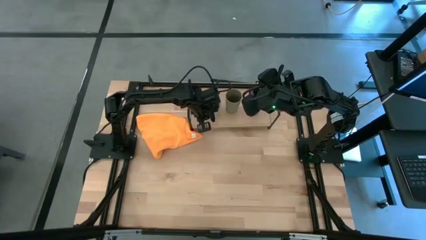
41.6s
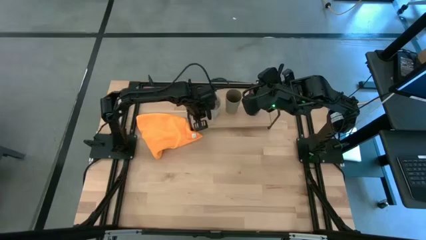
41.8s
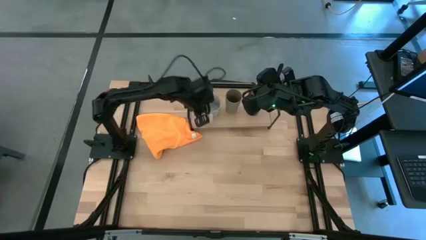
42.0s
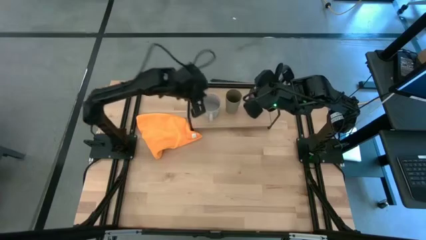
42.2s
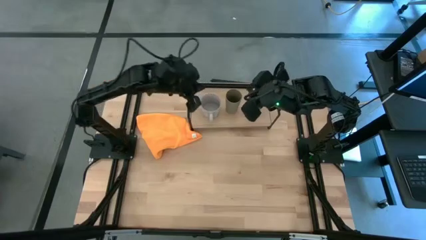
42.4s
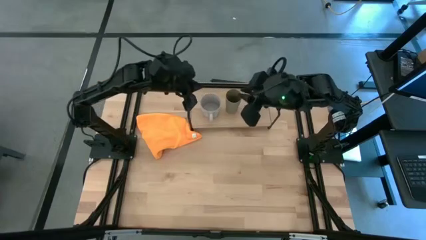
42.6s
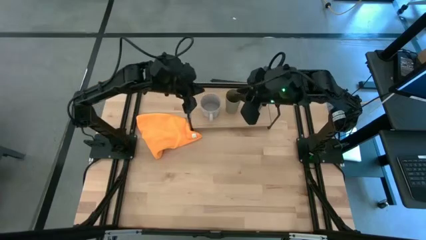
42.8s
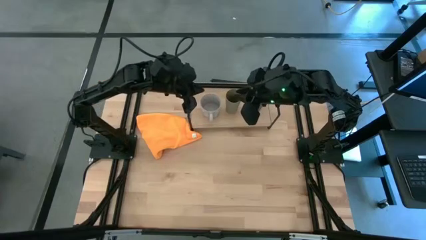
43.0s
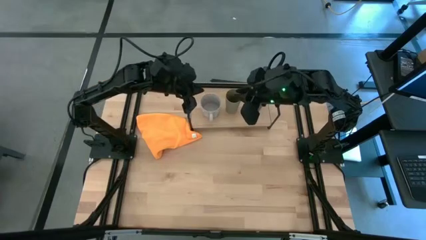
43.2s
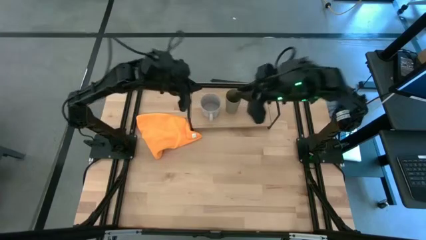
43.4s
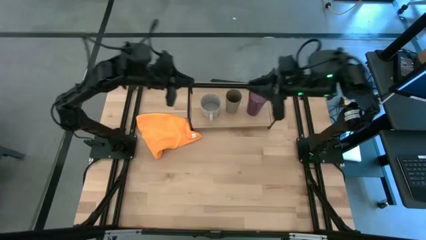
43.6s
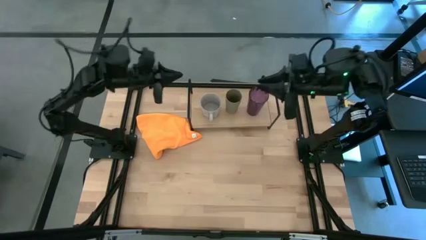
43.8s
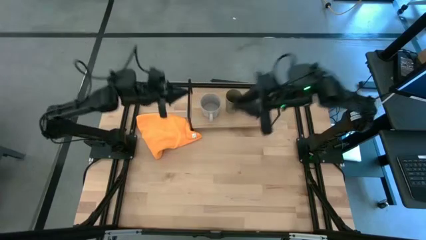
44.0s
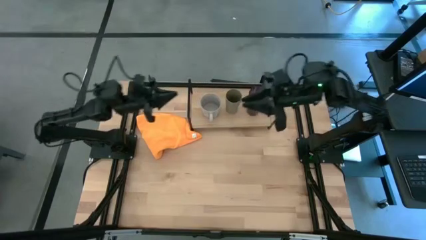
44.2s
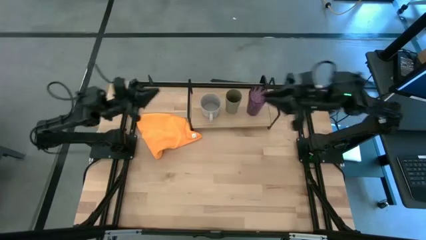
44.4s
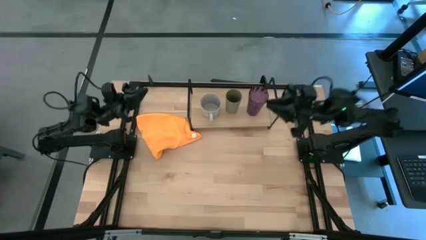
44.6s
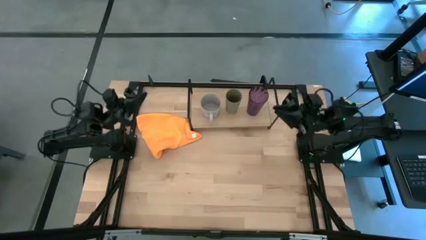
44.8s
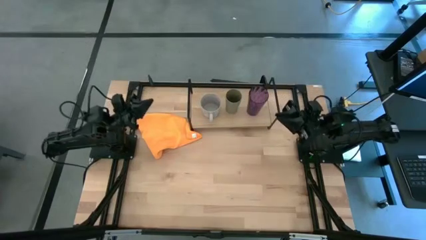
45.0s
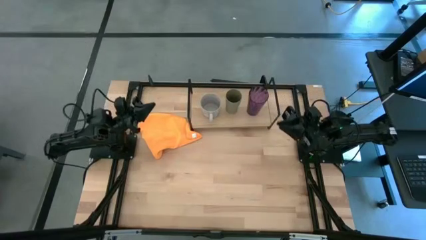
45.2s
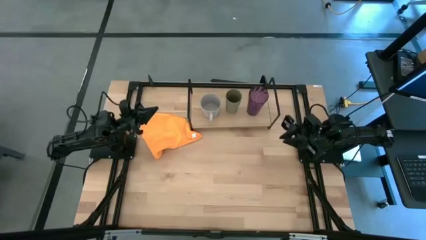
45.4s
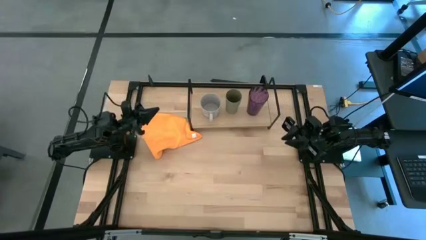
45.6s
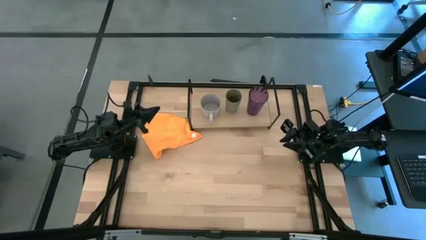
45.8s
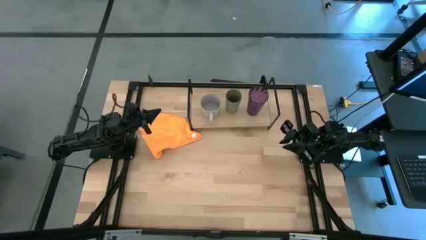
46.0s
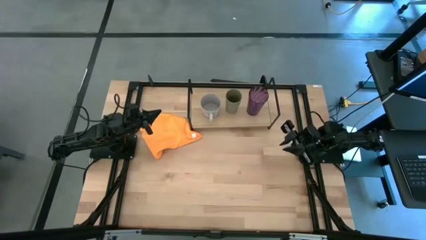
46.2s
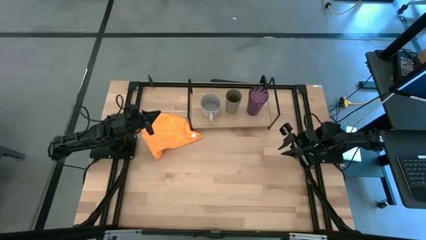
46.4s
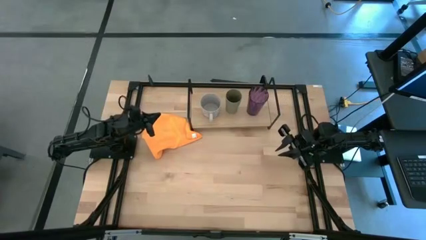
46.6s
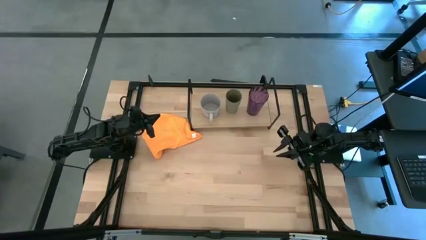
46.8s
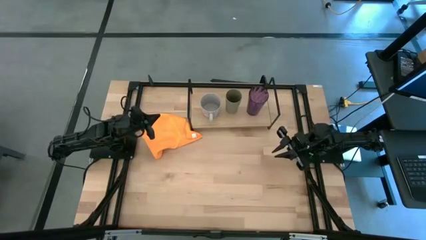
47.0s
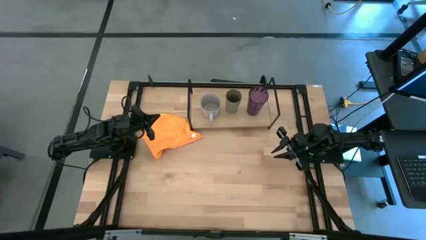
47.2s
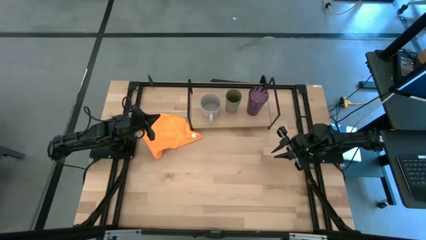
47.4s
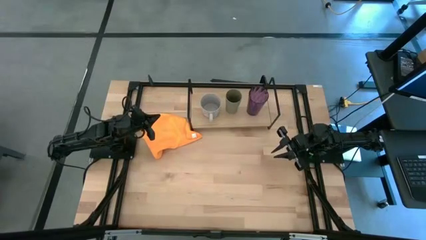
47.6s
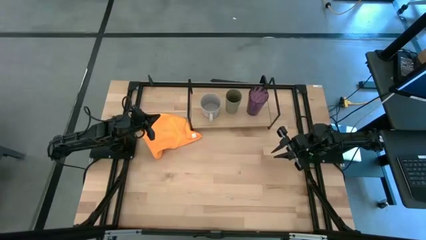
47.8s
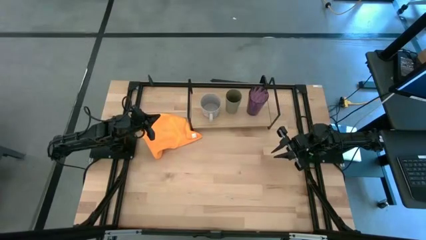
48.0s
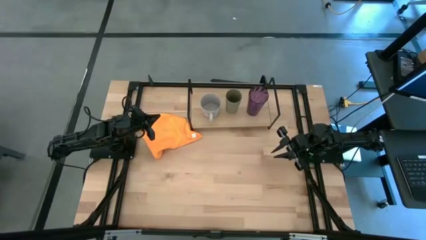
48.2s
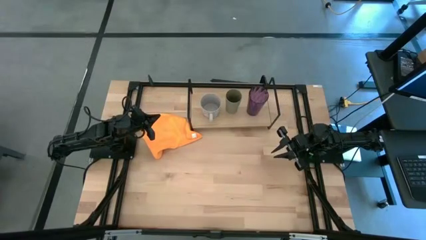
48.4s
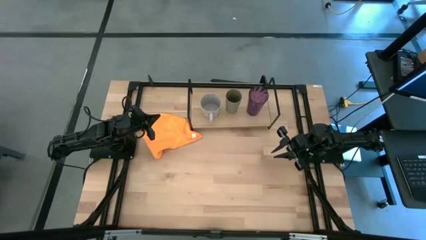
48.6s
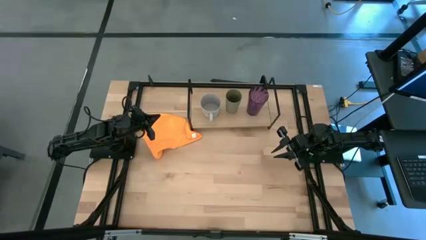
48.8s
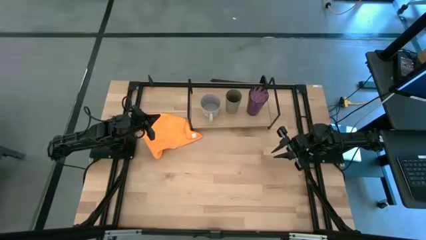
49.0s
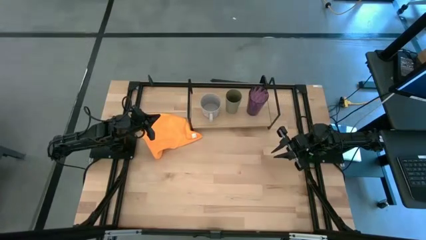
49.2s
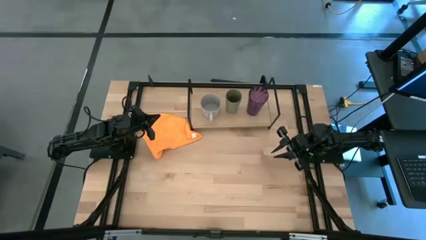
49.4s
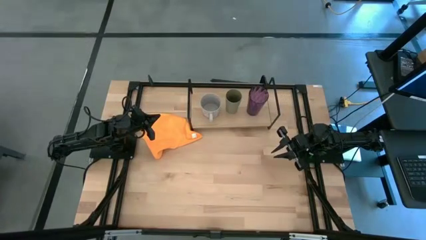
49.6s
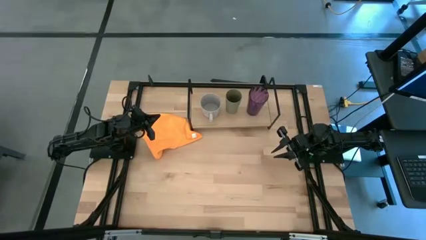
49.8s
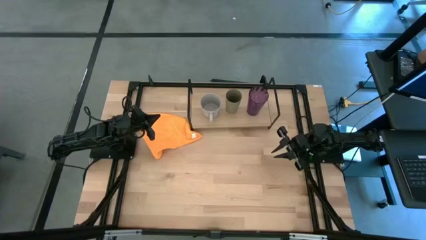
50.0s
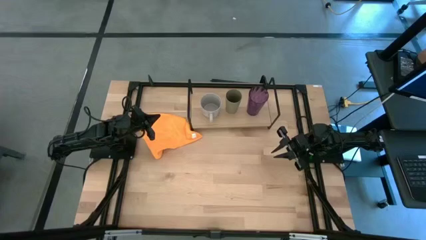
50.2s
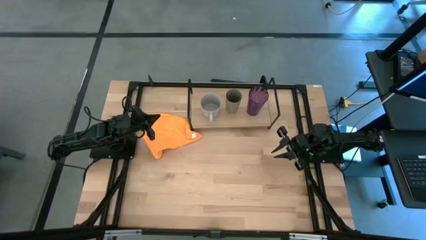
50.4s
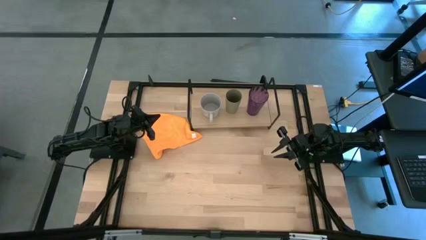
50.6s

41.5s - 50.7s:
Task: Stack small to large cups/mugs on shelf
Return to Home Position

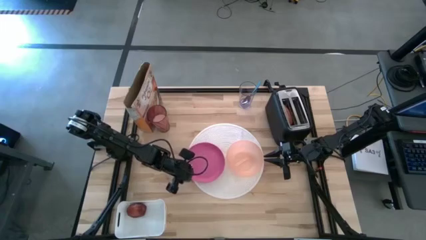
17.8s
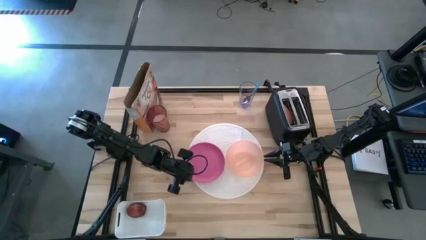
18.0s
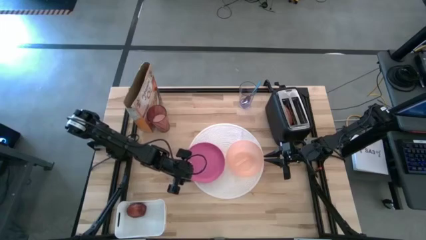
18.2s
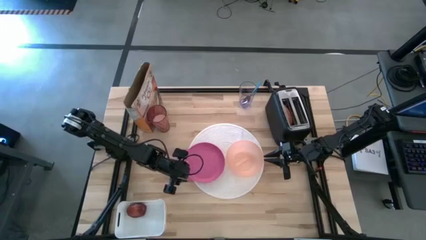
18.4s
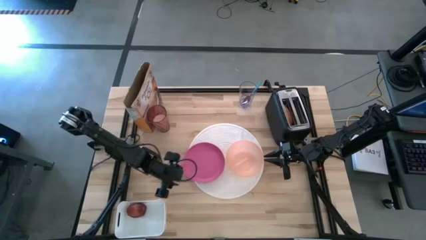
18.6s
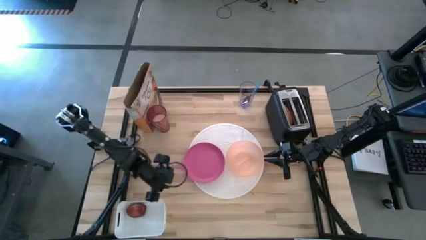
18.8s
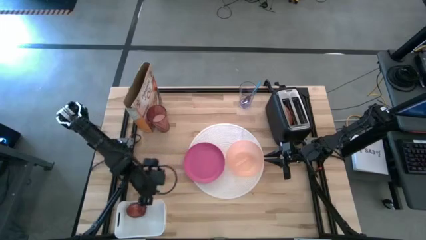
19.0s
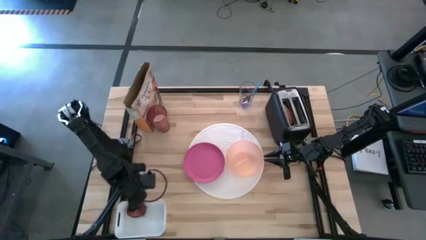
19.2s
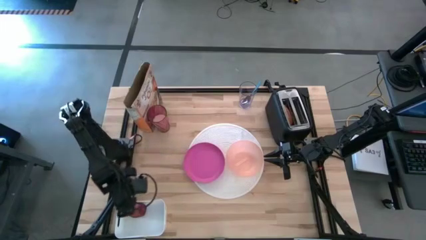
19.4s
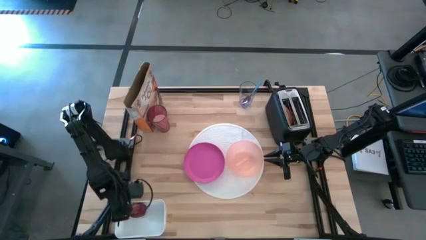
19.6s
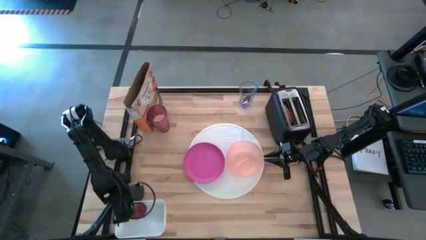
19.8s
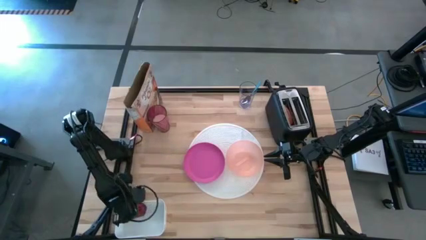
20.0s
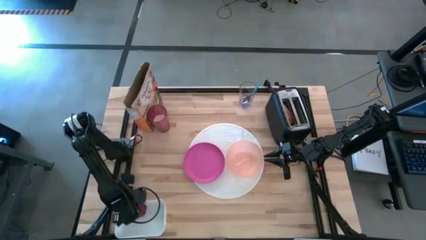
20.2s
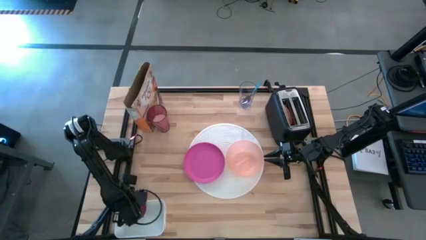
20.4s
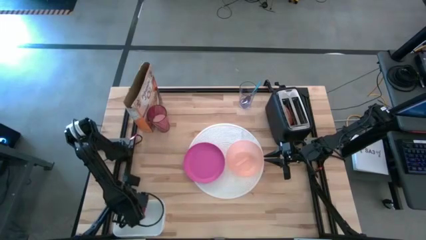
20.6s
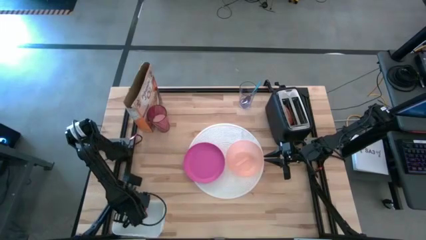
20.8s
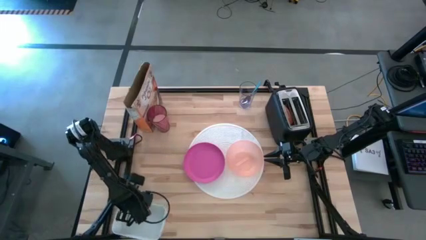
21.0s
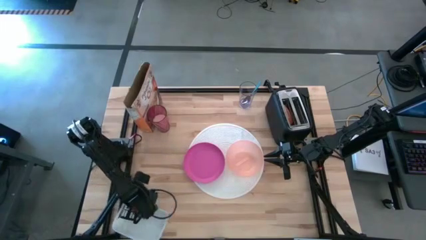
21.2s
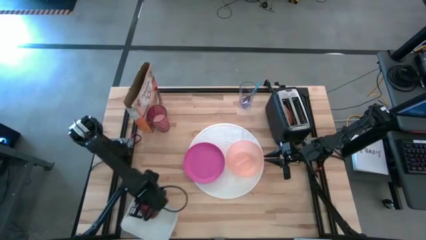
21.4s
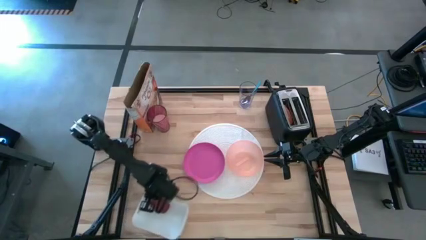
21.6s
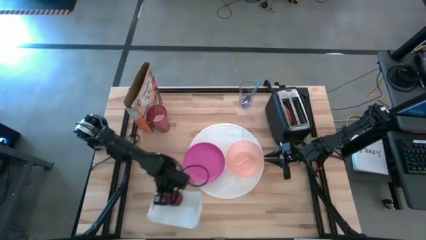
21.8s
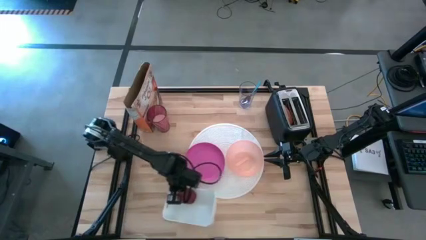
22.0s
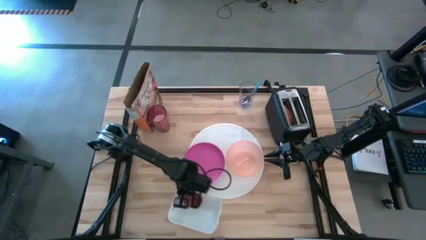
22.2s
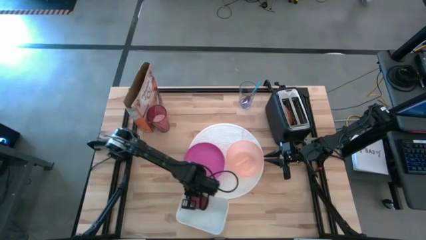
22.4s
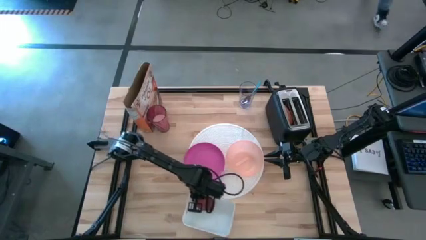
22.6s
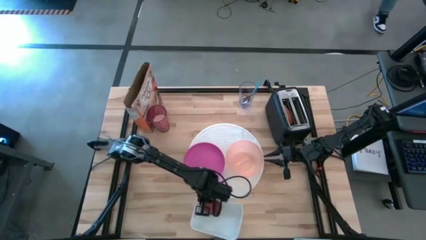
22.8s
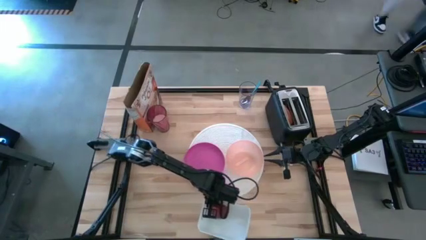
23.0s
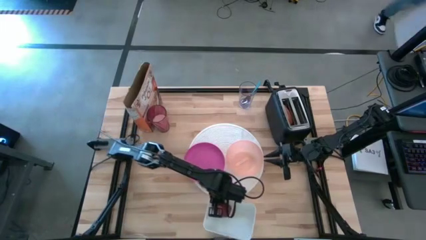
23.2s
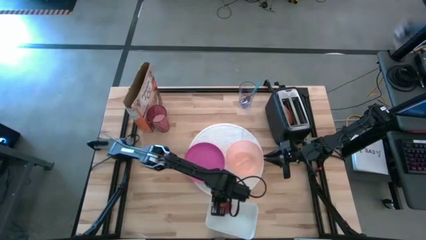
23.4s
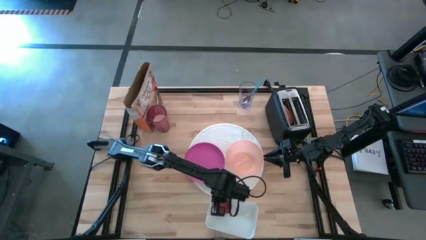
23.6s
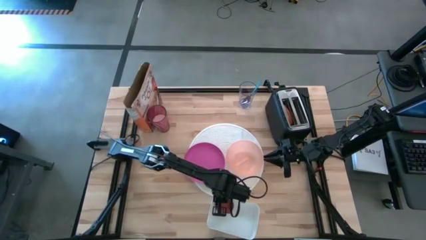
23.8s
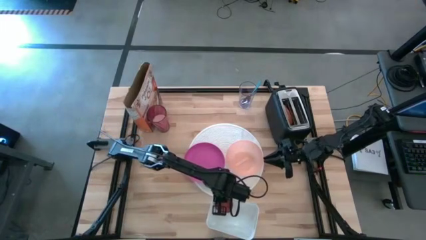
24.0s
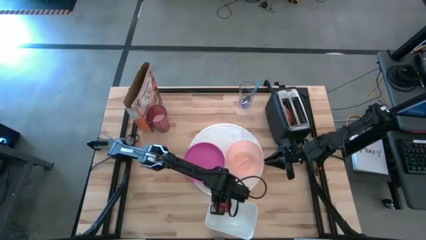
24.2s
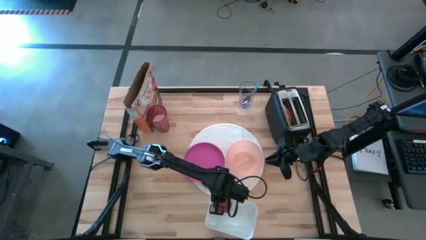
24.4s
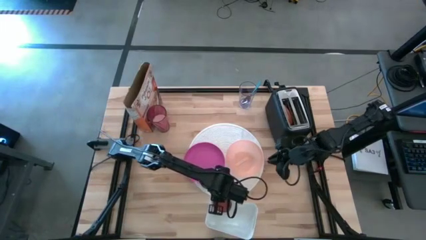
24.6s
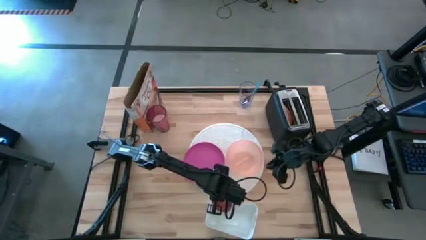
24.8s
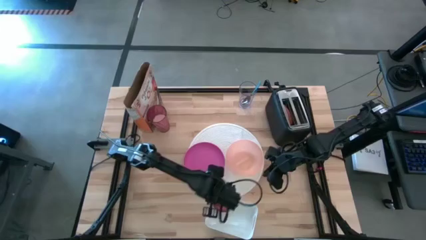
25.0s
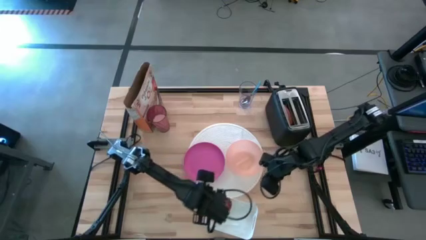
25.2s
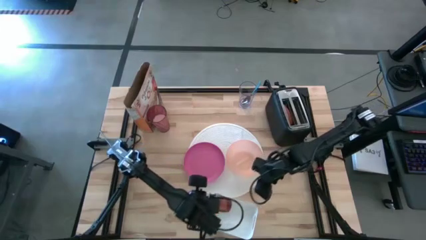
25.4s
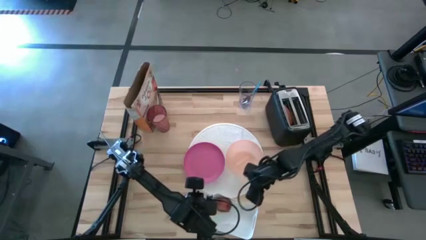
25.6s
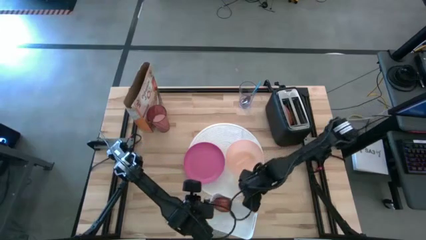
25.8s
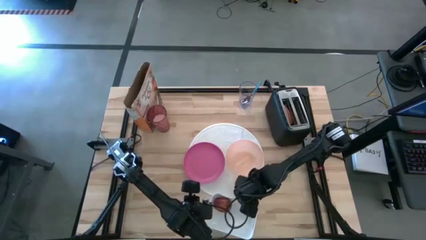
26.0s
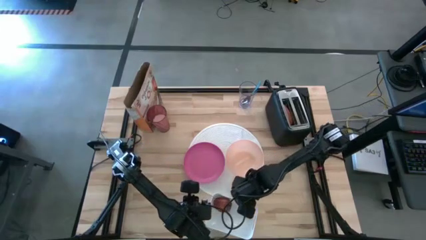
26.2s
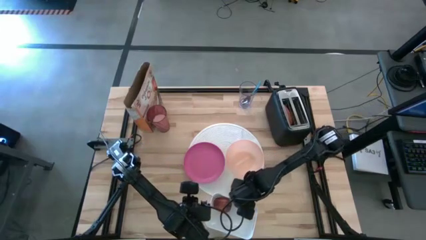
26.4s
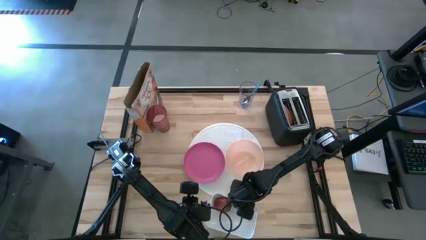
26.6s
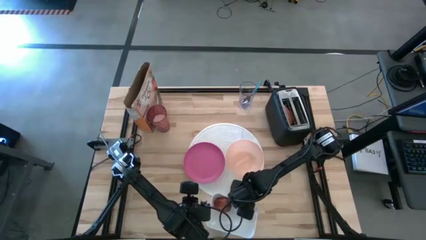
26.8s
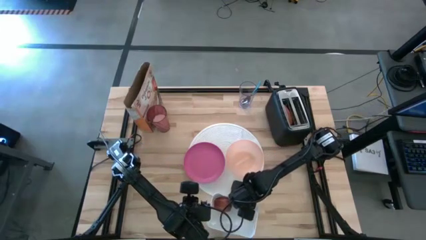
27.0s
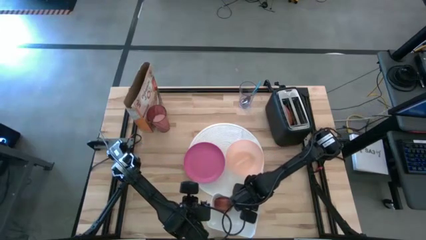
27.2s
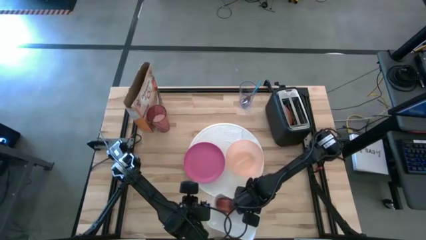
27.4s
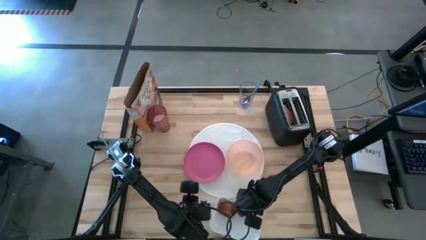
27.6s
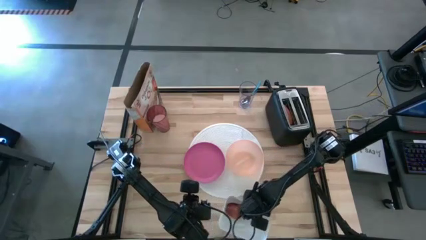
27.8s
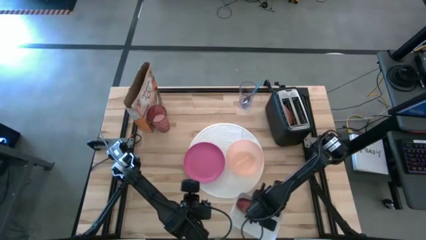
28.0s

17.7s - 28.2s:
Task: Arrange a breakfast setting
Move the white bin to the bottom right of the table
